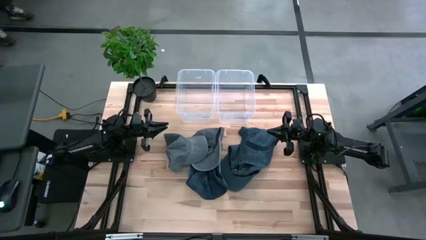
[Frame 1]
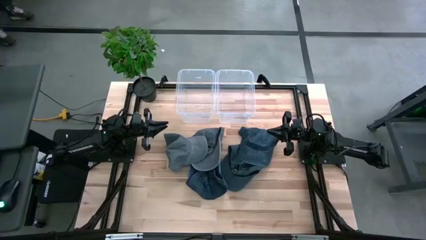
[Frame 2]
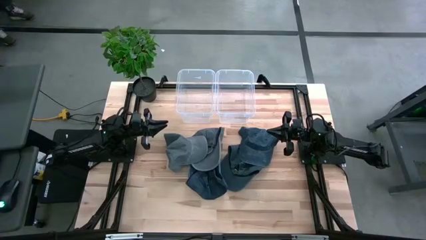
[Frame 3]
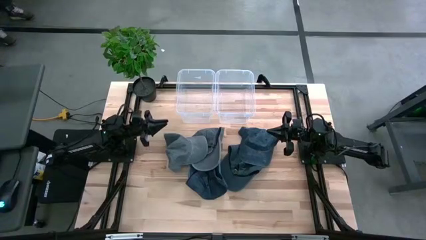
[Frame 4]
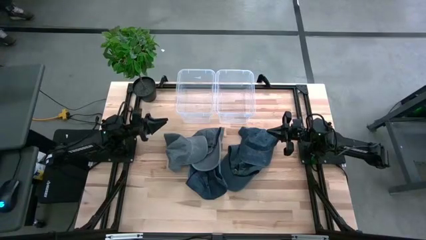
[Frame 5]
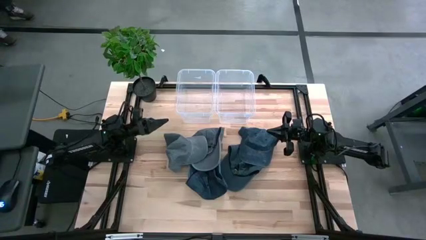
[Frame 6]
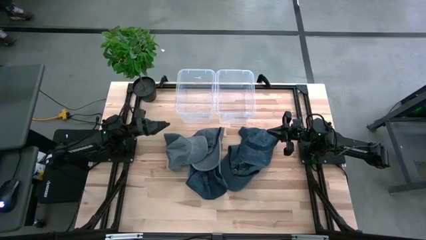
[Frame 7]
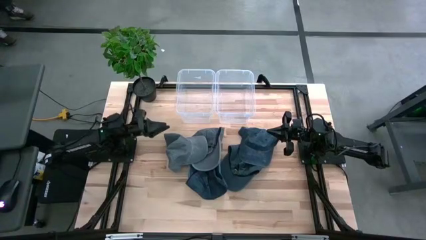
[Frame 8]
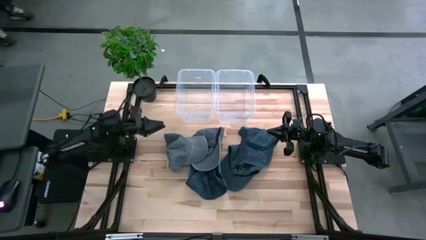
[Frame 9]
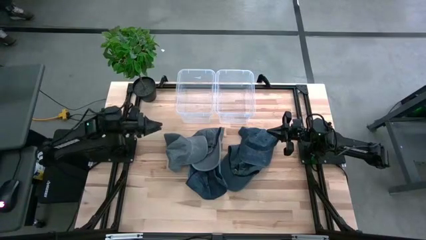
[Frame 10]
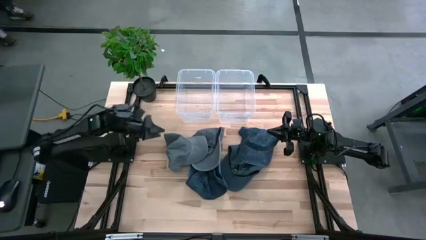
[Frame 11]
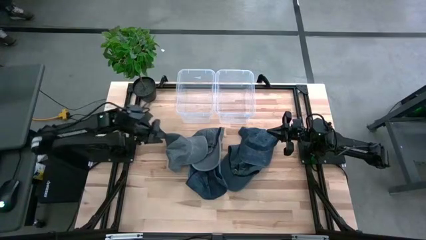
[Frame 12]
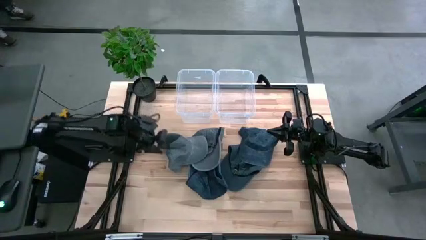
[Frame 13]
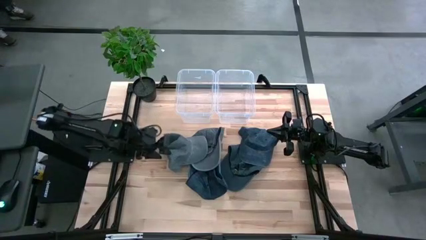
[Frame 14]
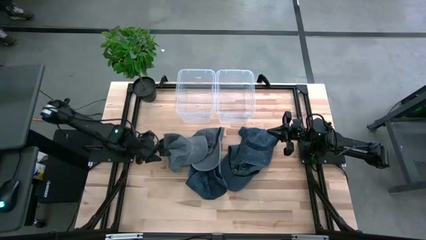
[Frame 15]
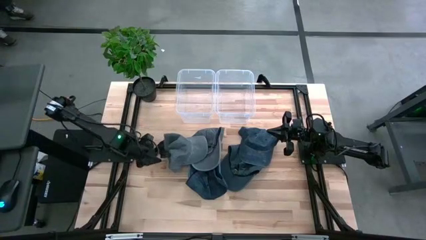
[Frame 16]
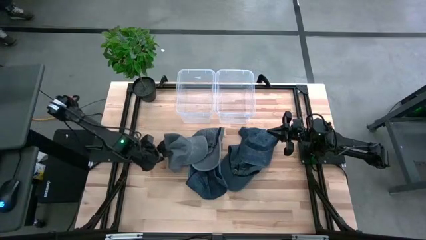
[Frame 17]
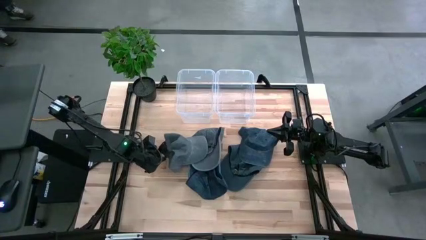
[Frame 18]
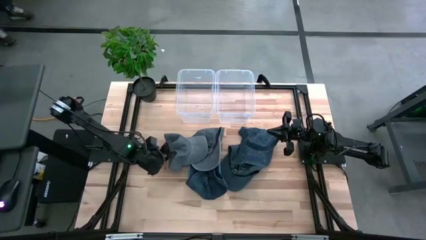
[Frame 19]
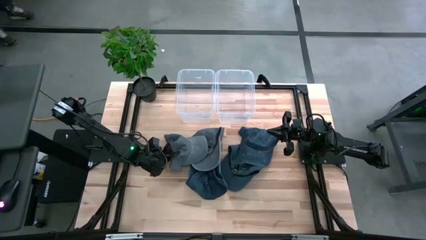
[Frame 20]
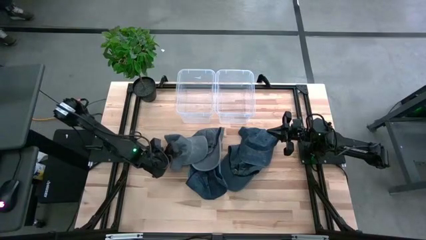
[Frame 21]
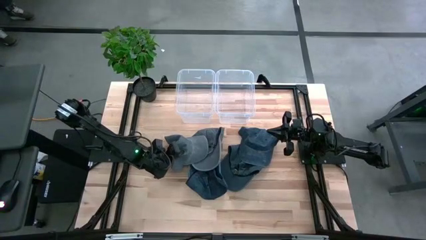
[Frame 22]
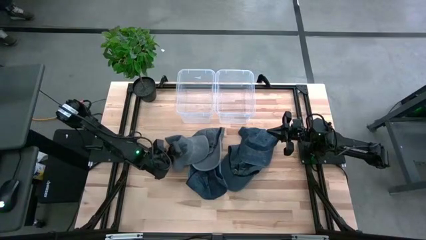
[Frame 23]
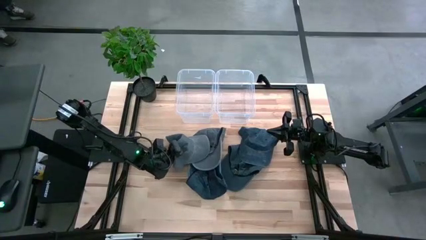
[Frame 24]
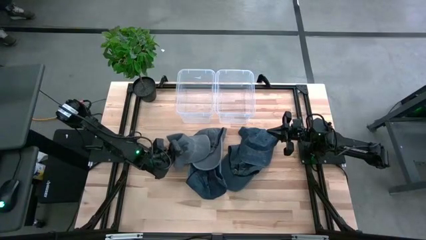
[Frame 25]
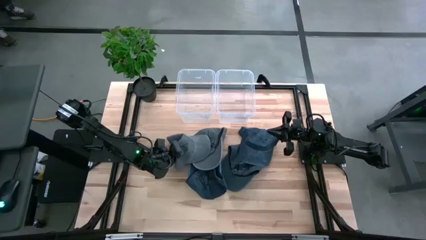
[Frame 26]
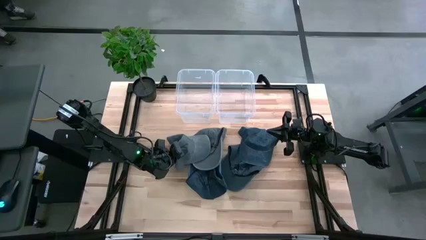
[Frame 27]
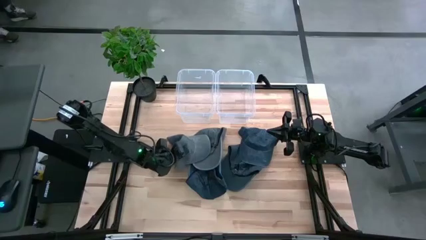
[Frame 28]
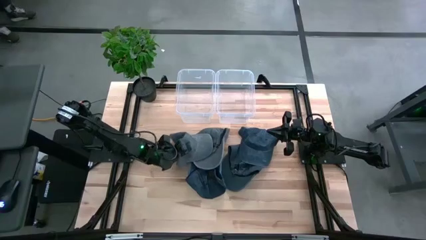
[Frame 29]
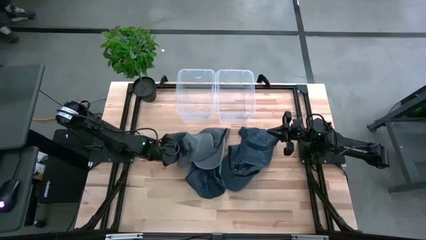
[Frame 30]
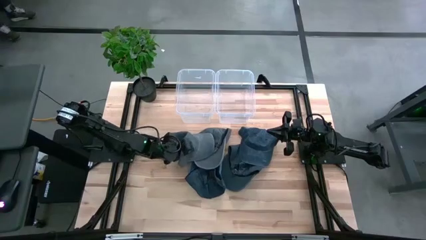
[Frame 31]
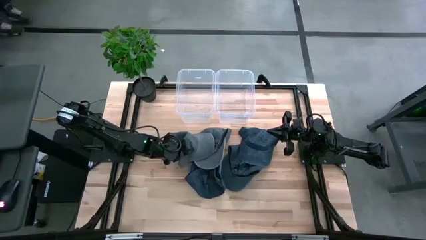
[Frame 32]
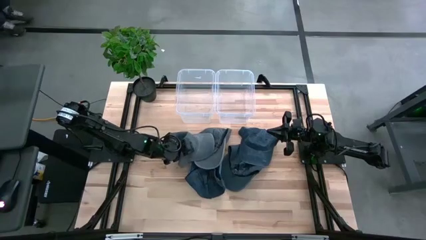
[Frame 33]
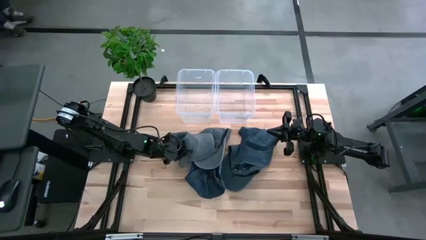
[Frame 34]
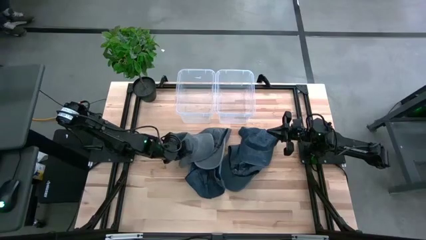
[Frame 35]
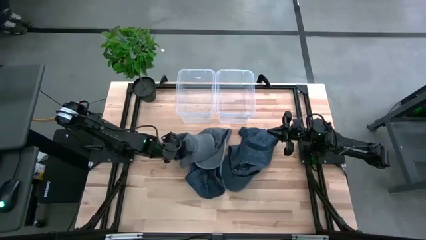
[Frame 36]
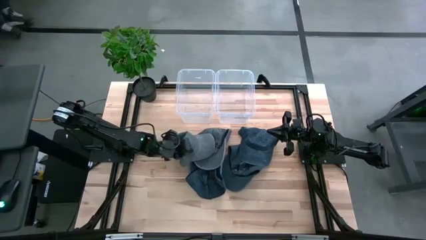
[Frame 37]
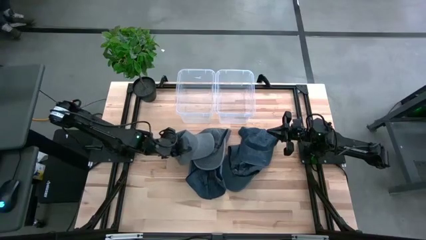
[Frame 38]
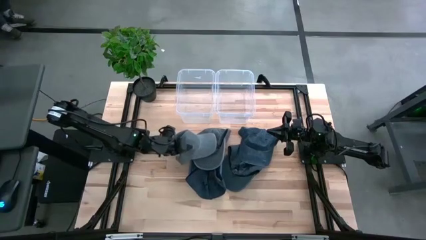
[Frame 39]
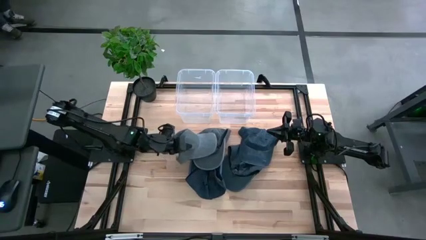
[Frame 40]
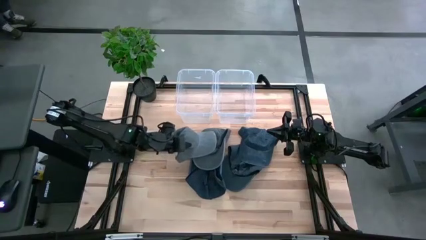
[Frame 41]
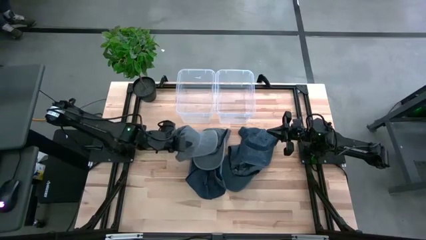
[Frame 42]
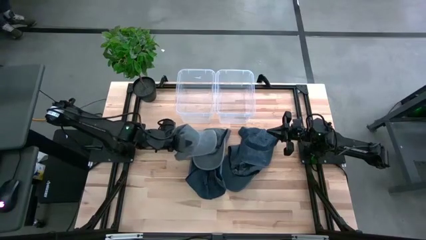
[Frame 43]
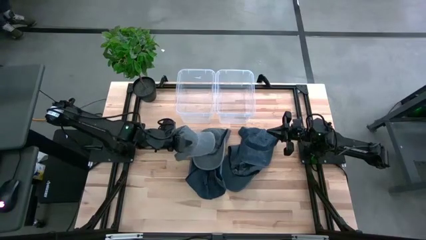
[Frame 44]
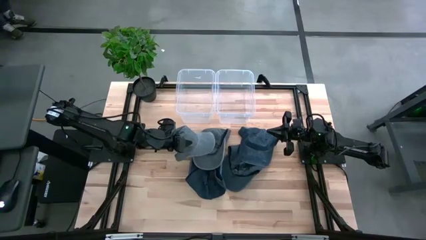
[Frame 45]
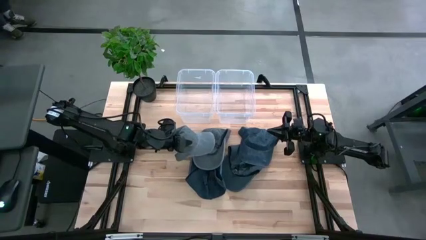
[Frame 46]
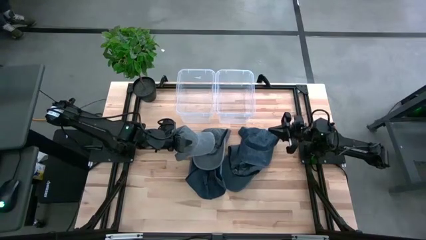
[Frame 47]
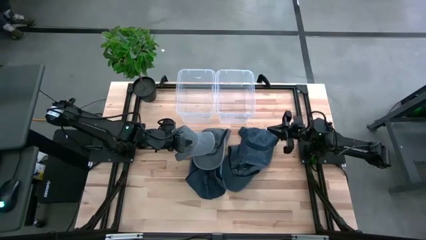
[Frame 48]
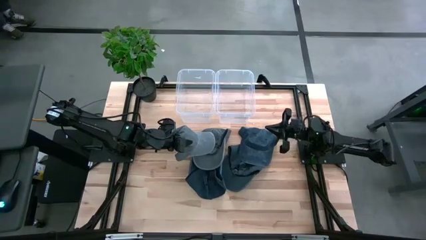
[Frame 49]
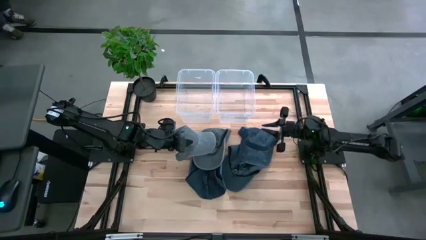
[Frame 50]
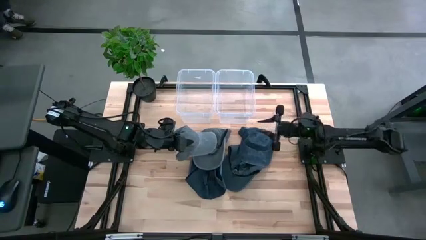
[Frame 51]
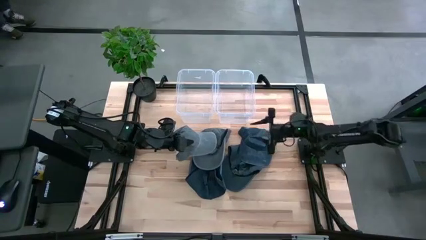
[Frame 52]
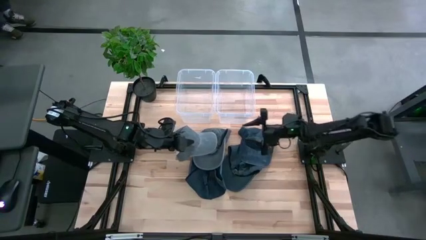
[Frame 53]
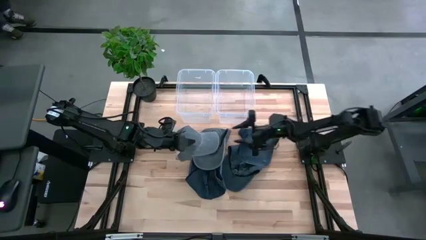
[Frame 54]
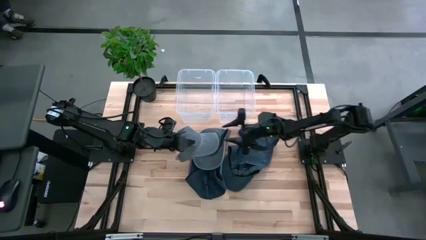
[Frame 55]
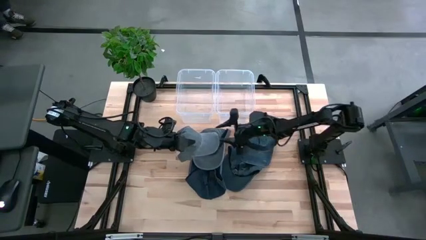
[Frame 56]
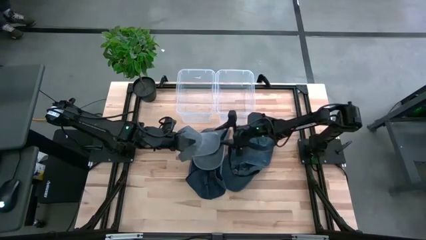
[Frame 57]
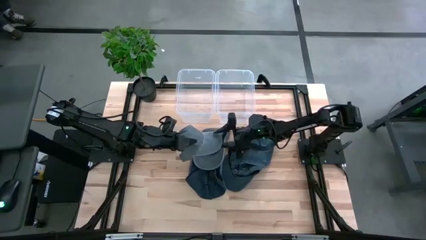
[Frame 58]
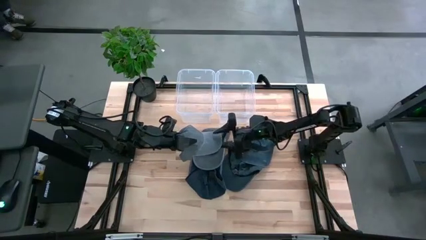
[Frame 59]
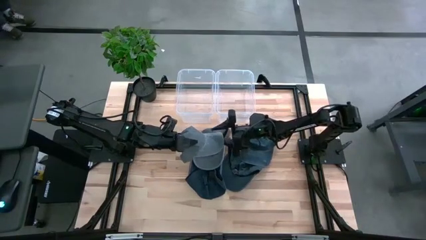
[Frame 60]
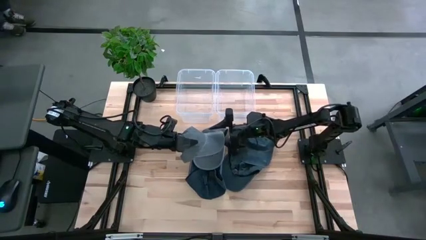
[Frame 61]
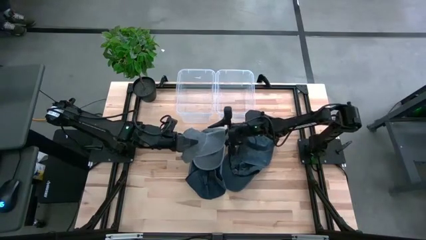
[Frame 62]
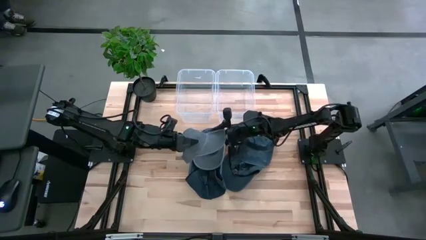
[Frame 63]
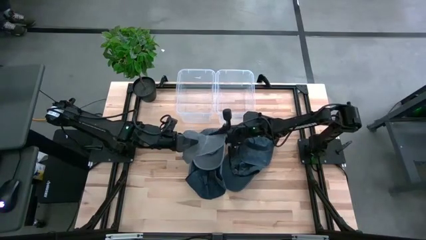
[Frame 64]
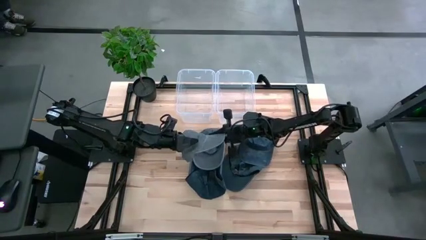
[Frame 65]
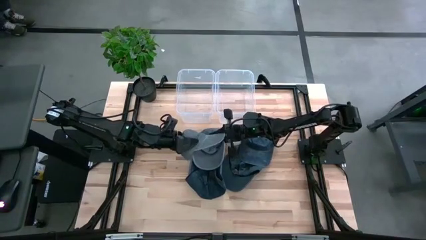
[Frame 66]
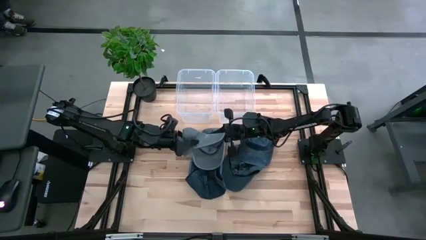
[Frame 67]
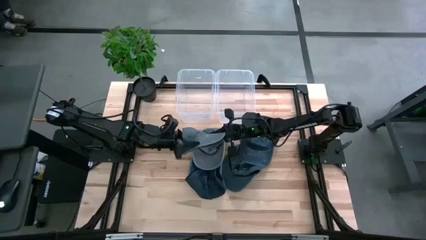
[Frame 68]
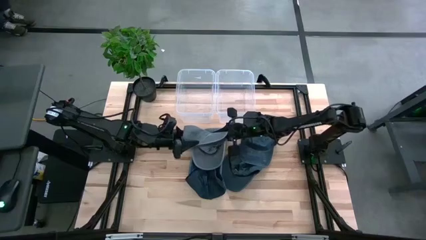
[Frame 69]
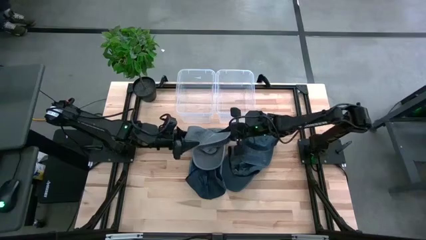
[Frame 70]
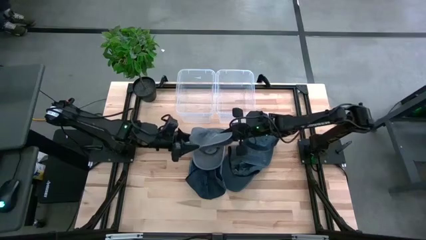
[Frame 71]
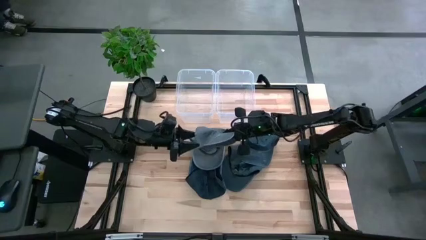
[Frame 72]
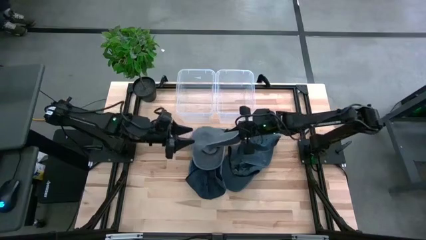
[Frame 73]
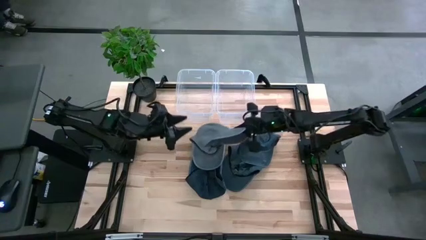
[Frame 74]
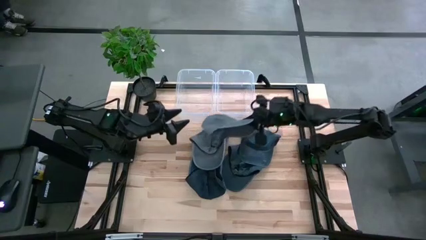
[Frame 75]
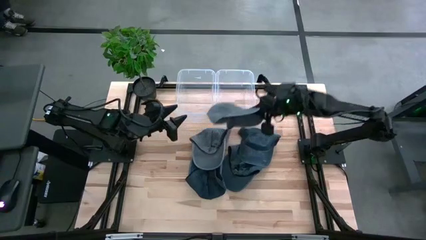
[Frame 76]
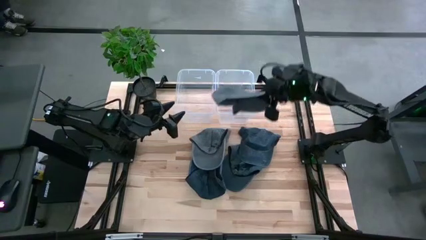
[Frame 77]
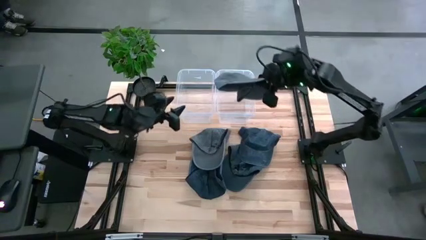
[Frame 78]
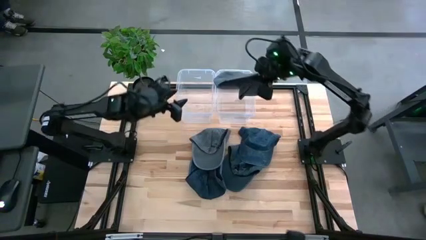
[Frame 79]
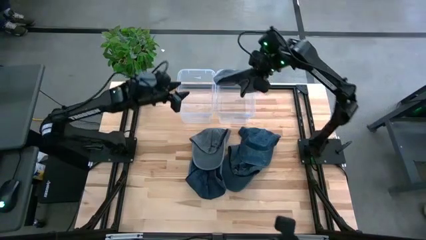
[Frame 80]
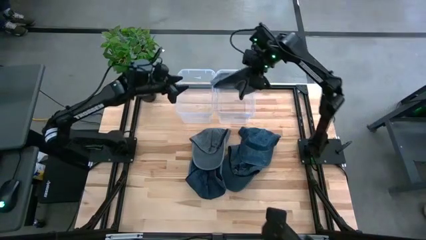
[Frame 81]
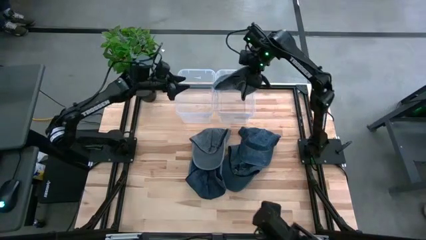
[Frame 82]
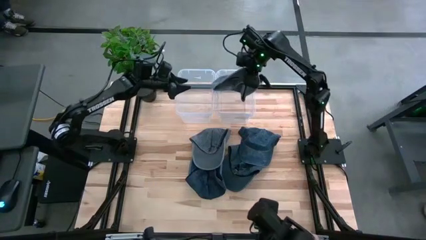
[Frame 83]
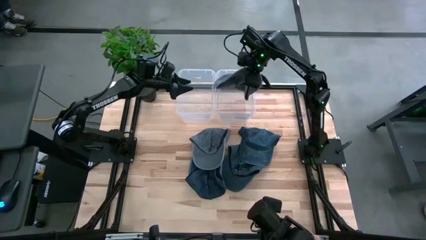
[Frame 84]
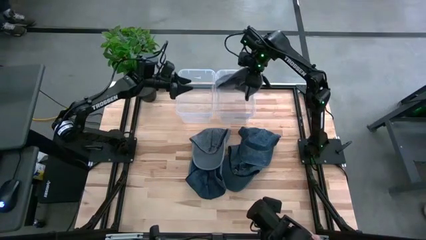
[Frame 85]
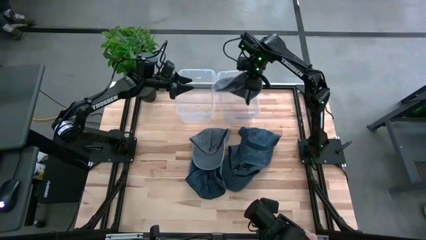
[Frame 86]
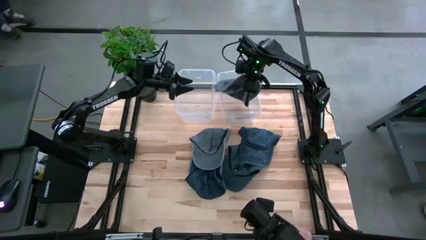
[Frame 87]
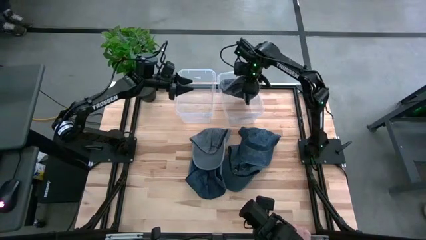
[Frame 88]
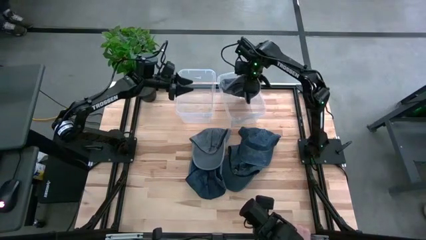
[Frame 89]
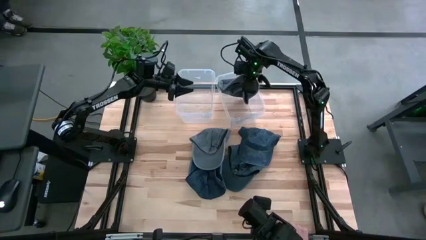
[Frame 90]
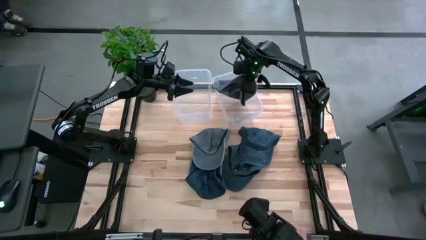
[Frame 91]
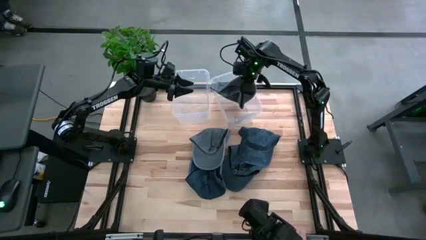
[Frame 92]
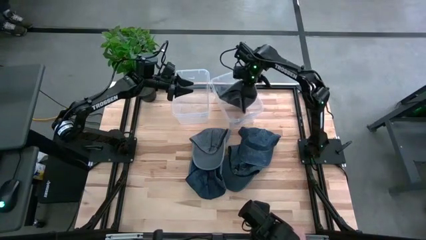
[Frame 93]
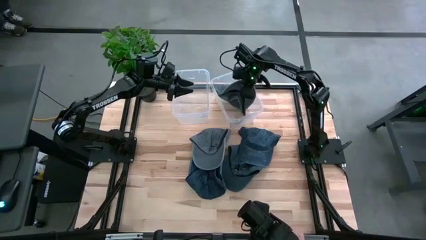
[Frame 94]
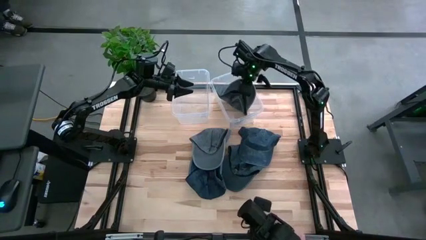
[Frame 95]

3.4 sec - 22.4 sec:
Task: Pick & Place hat
Put the left gray cap into the right transparent bin
